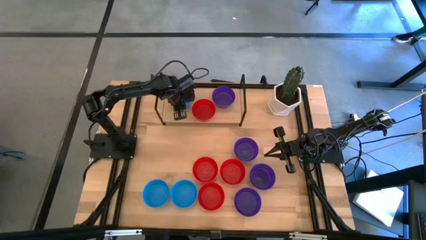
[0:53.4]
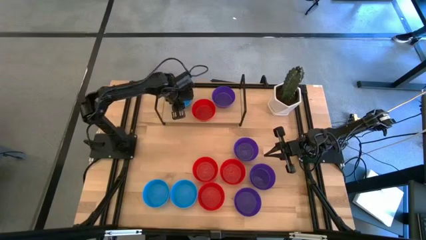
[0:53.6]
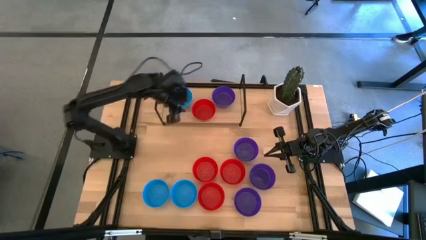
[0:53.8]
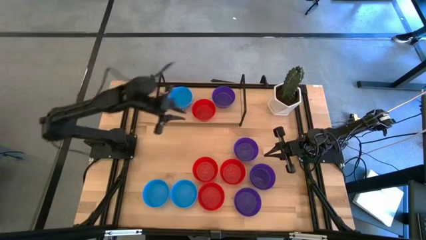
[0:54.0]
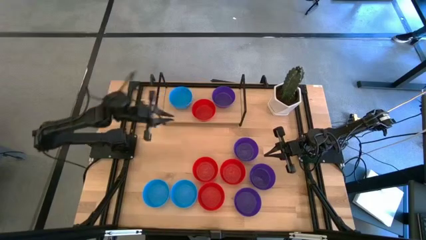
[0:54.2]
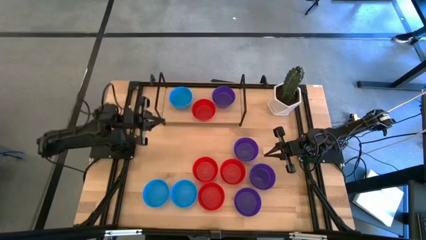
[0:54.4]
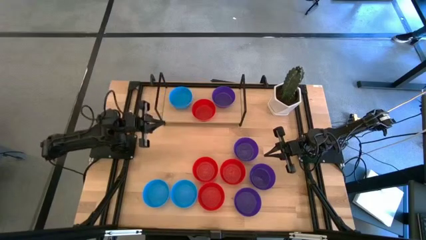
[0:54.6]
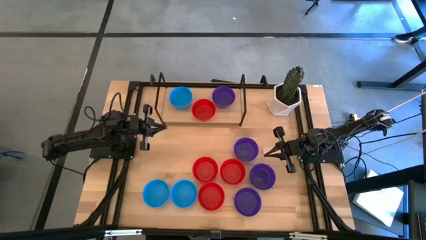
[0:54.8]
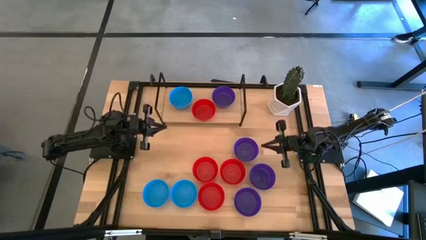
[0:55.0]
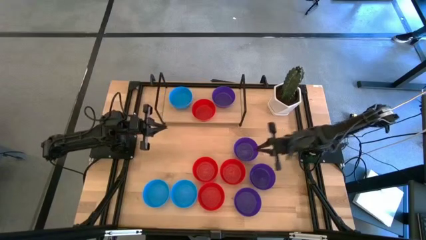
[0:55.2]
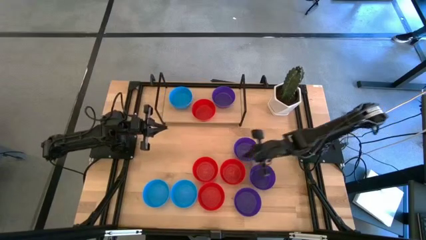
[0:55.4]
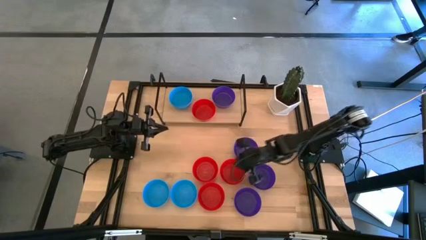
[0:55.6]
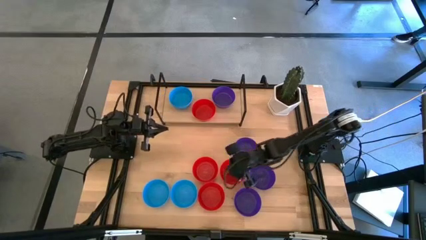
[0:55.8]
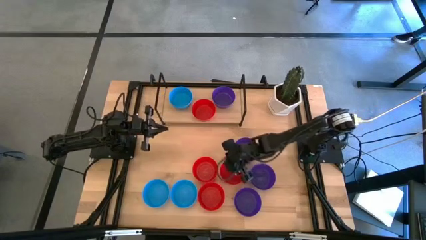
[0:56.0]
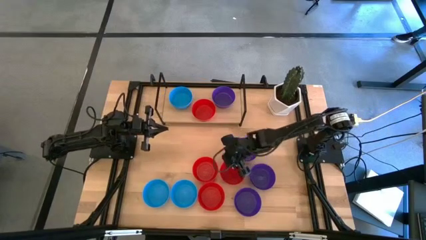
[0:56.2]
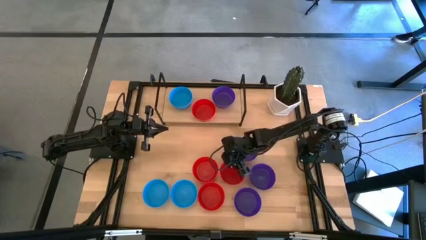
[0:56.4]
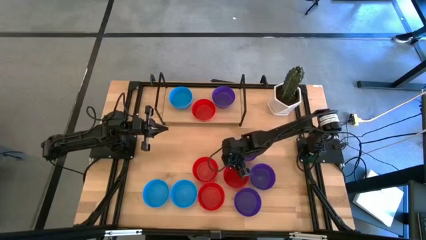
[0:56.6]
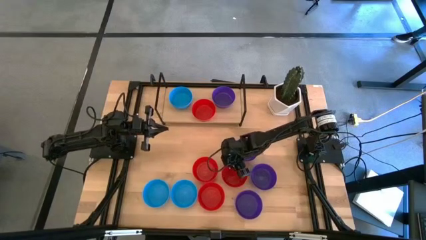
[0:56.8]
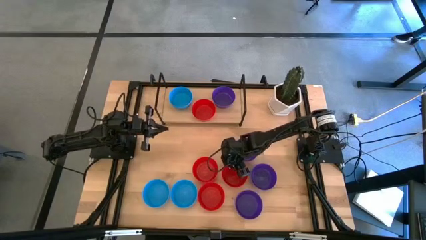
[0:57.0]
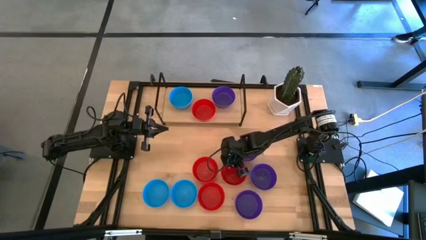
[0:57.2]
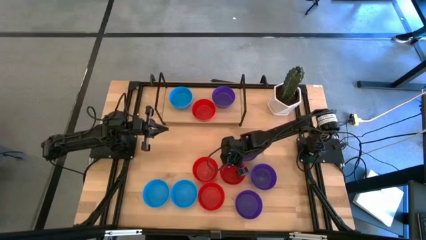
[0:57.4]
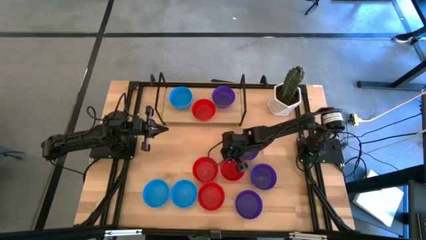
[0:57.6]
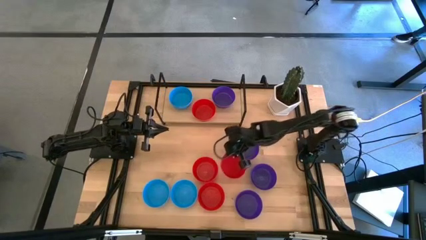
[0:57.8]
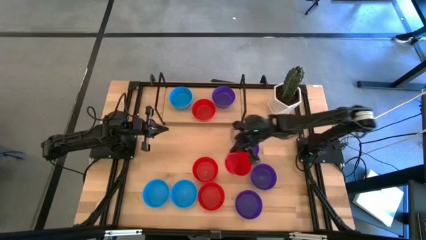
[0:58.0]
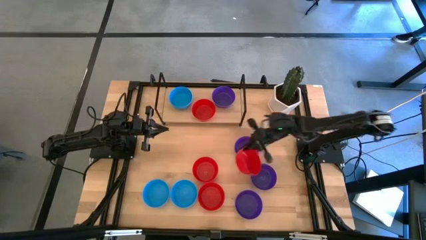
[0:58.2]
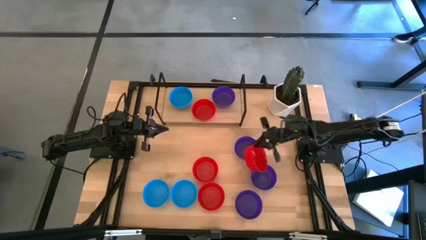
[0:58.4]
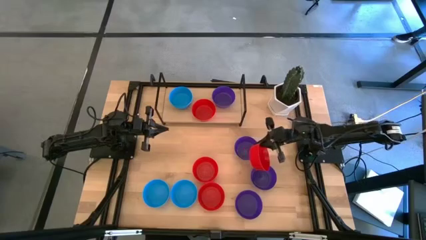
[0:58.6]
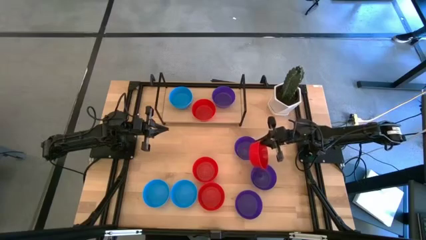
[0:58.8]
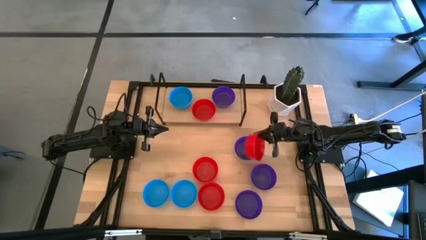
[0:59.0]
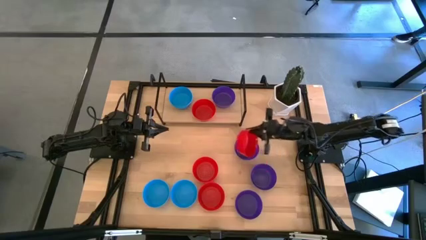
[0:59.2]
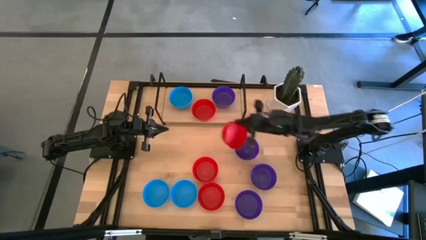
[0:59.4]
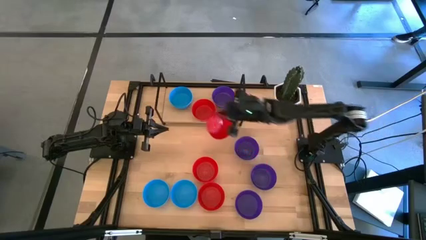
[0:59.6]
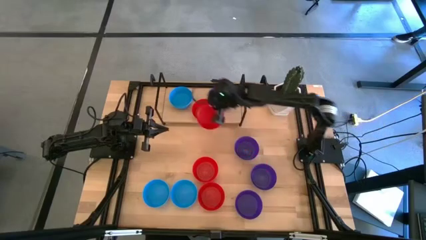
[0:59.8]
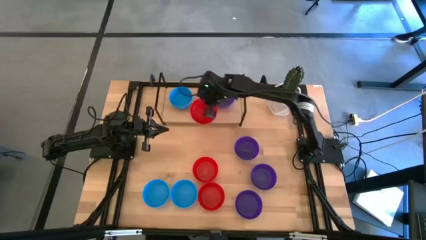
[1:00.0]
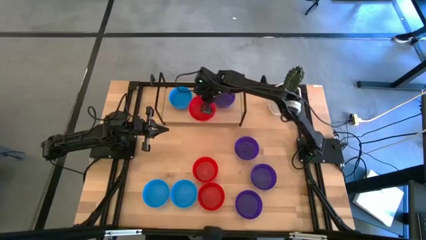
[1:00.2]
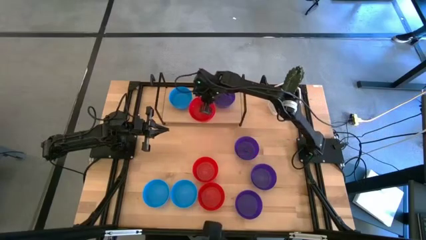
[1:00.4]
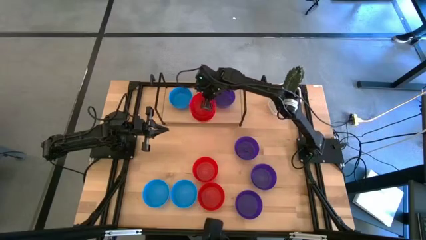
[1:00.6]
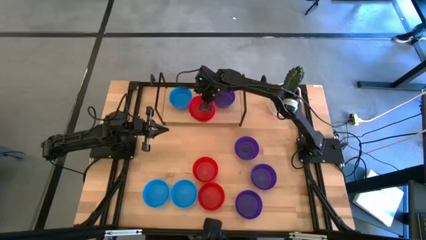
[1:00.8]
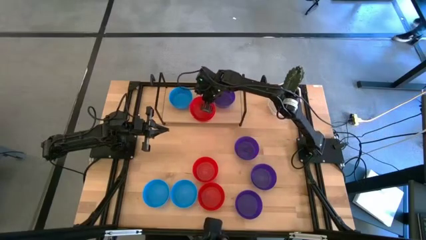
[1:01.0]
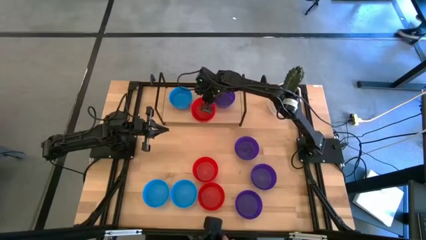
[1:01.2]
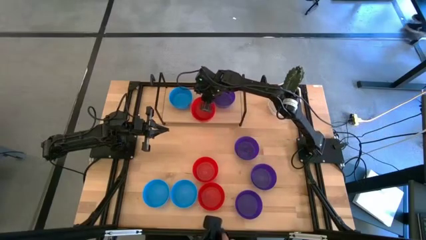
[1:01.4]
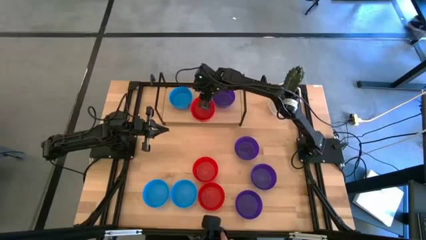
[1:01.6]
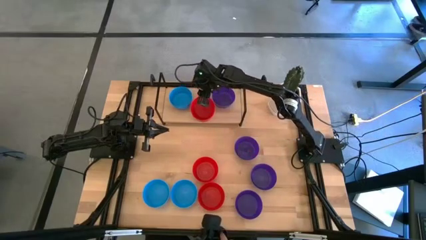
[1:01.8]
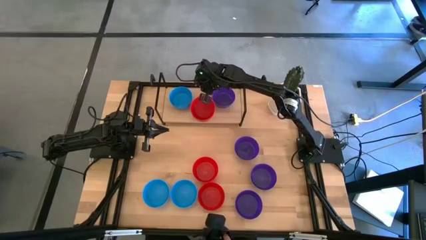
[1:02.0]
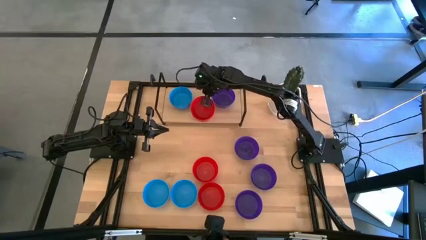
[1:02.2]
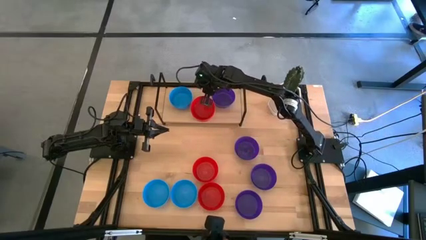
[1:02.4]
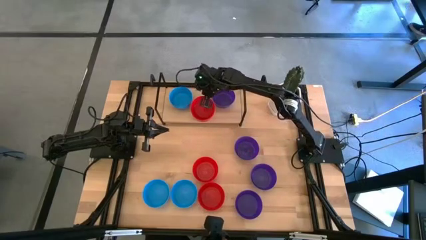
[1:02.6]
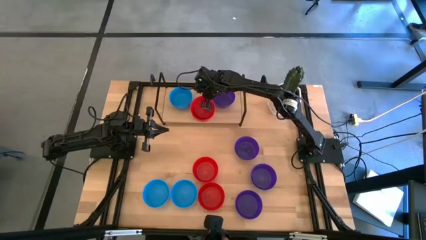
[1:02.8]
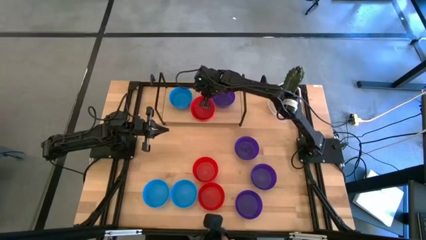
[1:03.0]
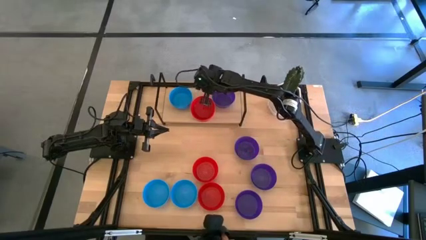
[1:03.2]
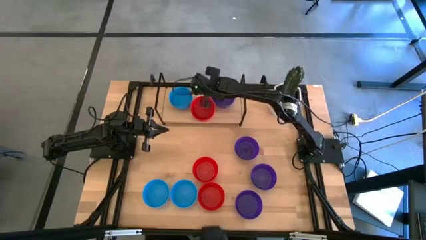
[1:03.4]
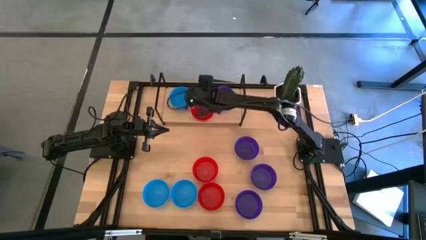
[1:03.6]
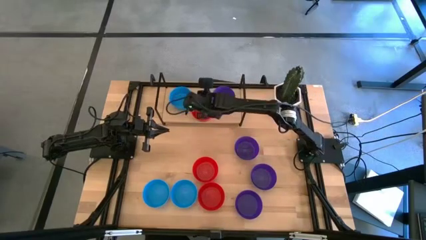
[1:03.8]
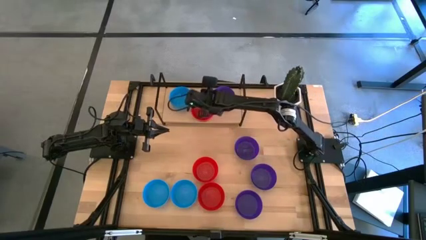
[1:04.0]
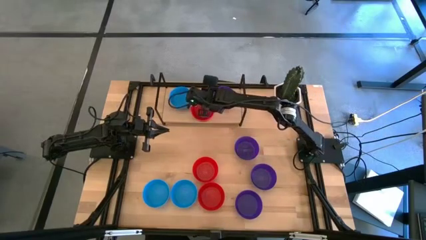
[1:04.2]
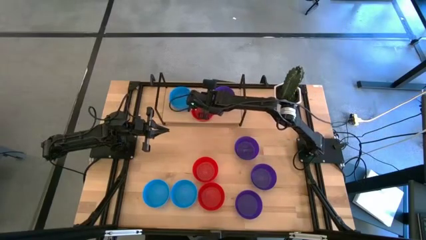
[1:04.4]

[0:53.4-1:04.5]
Task: Pick & Place Mini bowls
Stack the red bowl on top of the red bowl on the shelf

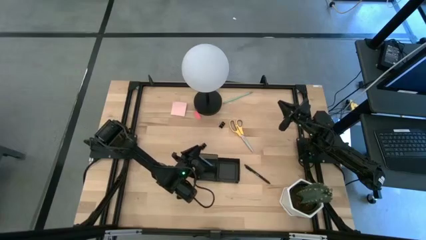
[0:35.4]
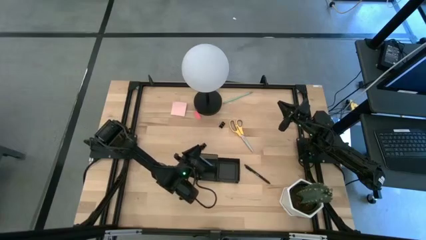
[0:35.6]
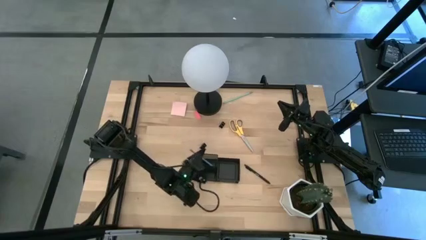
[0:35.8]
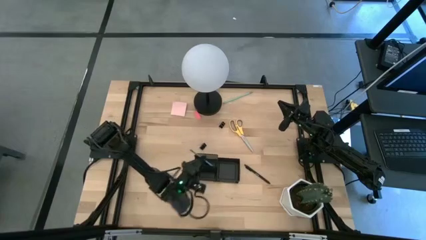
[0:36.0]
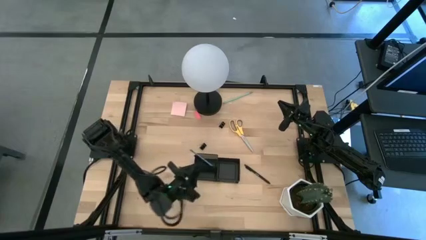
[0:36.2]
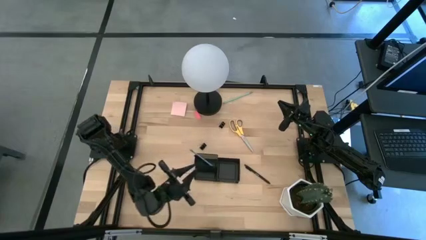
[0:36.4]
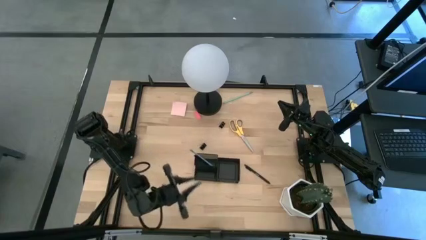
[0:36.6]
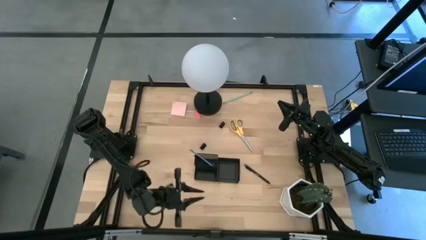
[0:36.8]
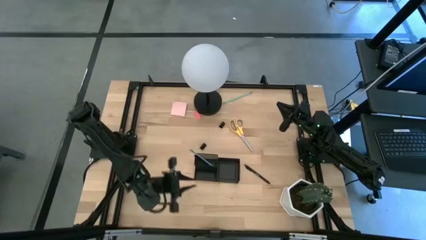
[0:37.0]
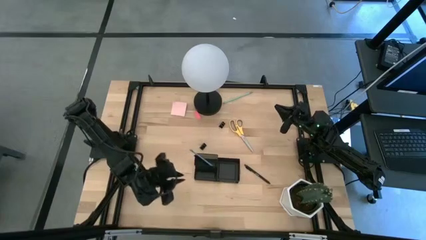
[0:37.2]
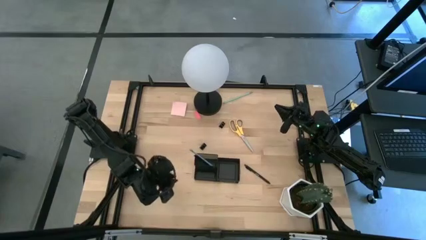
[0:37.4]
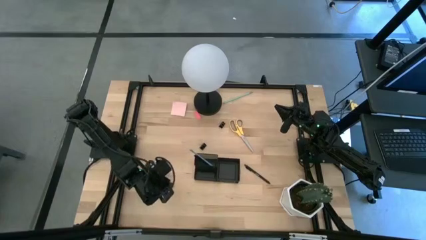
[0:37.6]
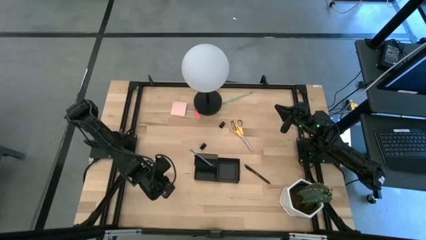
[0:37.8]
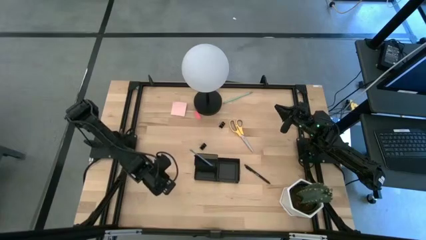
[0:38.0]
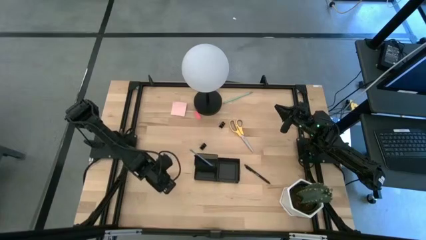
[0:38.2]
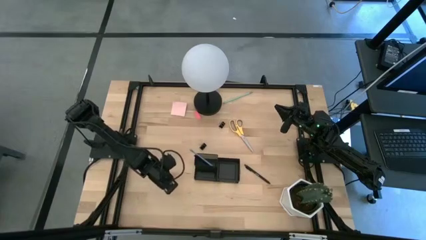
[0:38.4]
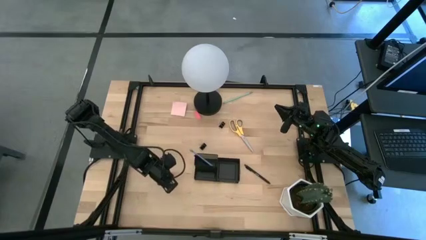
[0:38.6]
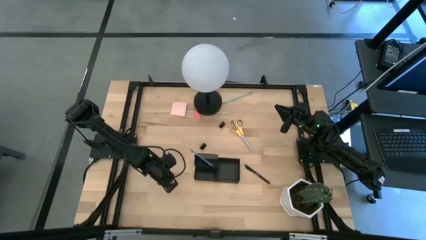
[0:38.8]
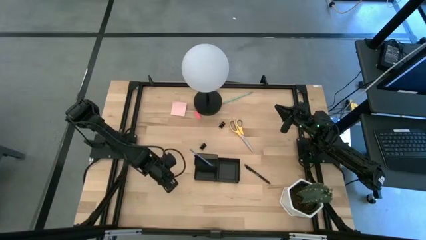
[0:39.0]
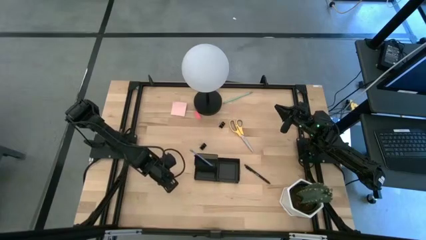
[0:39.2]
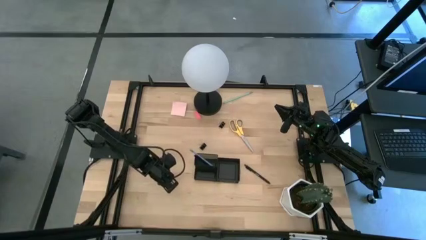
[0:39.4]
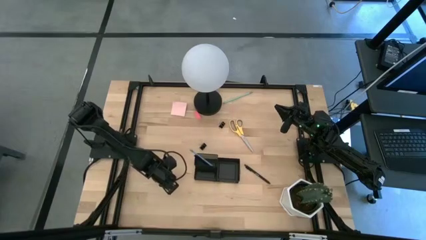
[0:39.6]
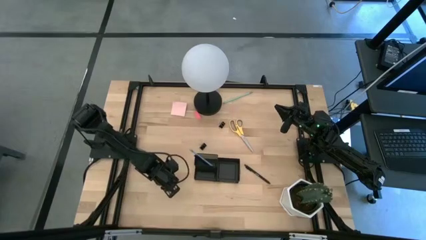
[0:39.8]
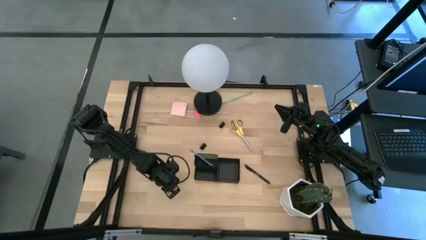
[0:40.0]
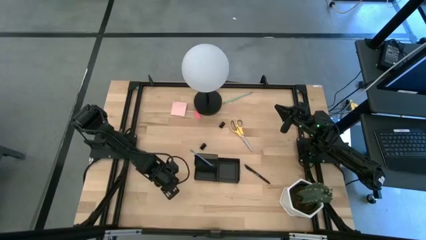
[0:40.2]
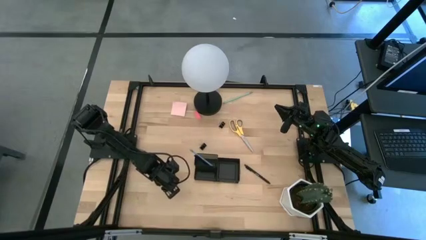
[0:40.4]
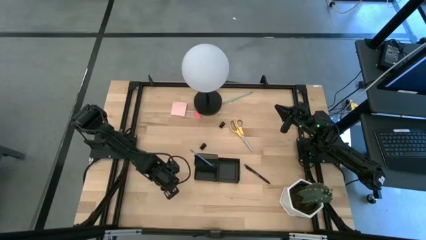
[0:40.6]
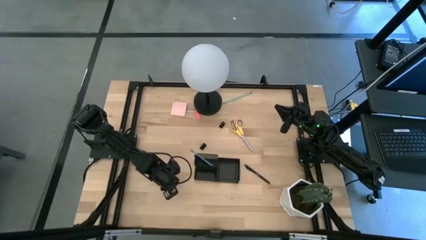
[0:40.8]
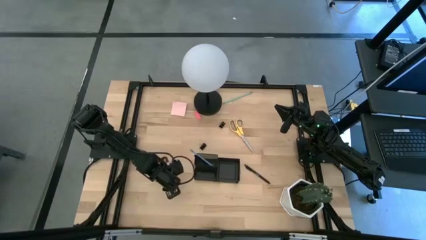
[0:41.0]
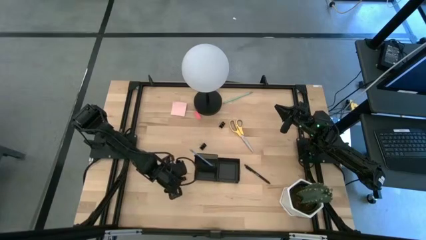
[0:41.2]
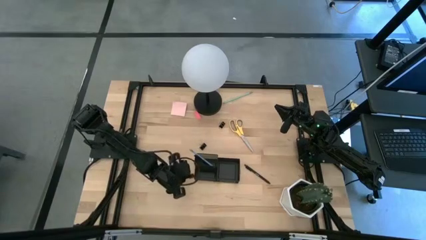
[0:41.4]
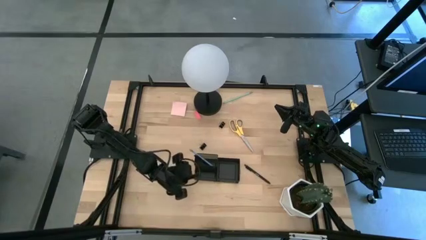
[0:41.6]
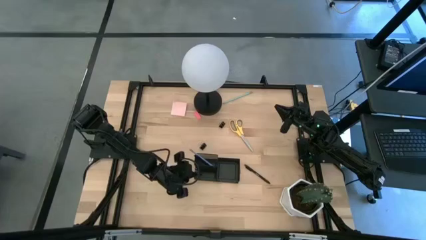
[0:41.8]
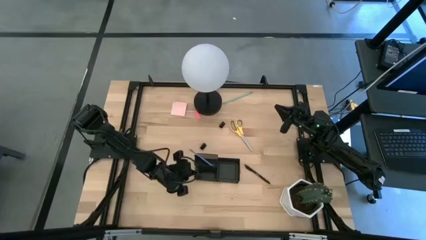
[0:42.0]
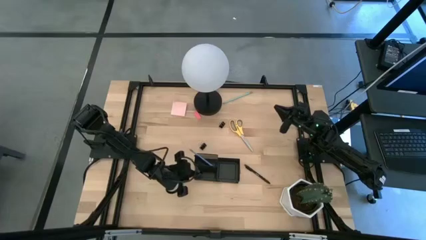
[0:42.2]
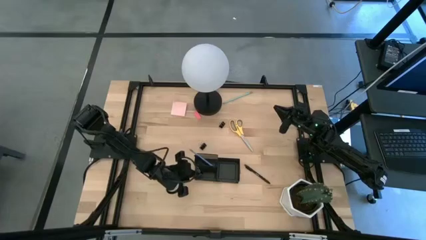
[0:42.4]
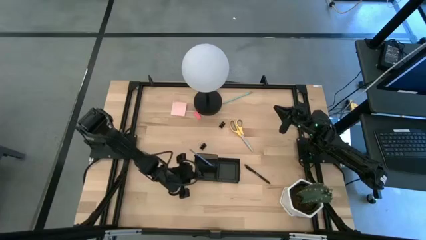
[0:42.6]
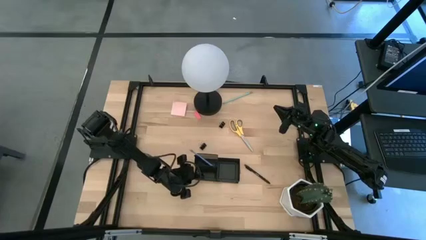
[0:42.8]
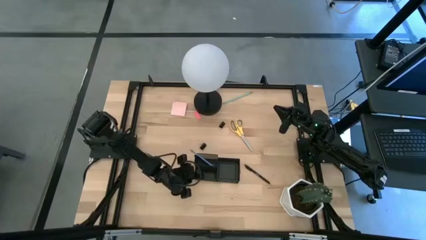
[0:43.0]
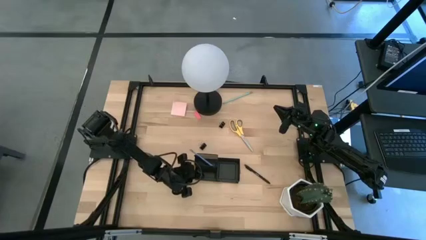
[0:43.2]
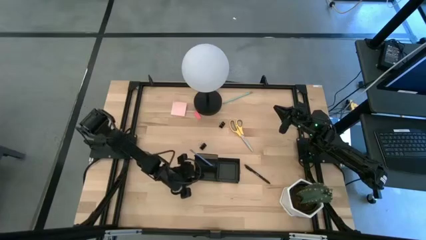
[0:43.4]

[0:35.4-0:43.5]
Task: Pick and place office supplies into organizer
Put the bottom black binder clip into the black desk organizer
